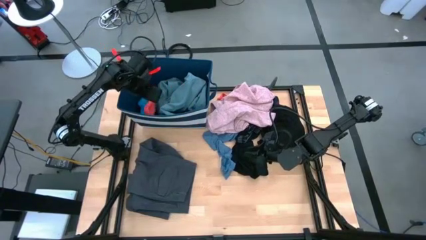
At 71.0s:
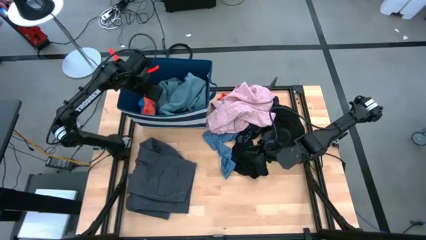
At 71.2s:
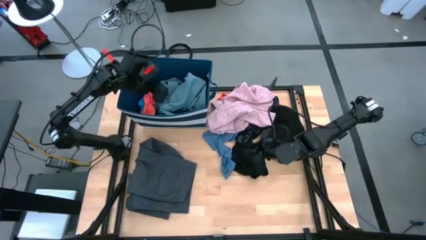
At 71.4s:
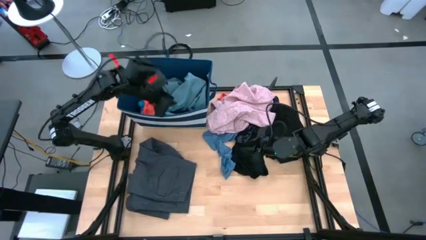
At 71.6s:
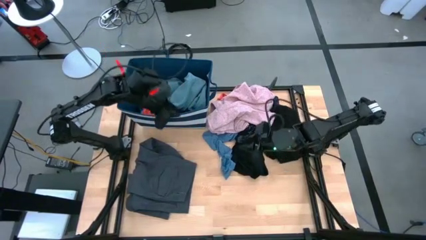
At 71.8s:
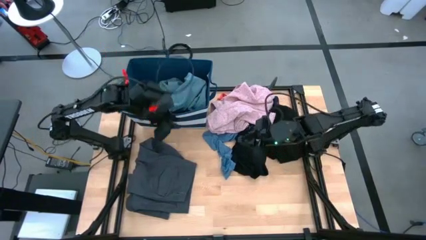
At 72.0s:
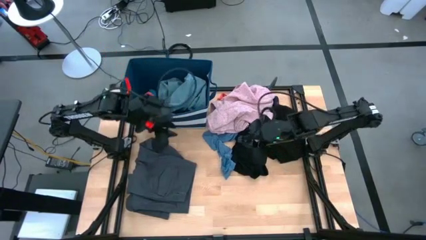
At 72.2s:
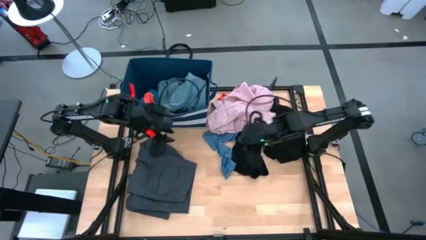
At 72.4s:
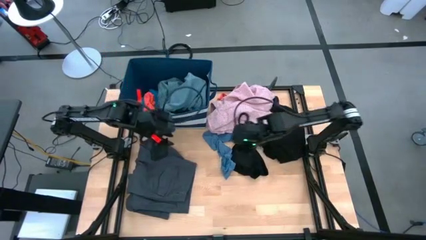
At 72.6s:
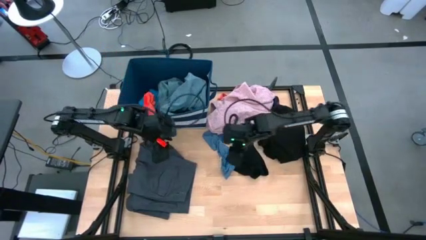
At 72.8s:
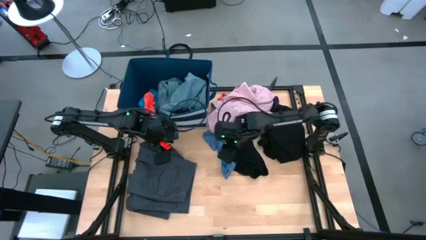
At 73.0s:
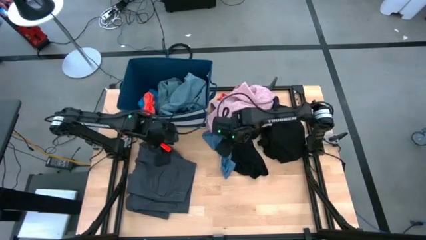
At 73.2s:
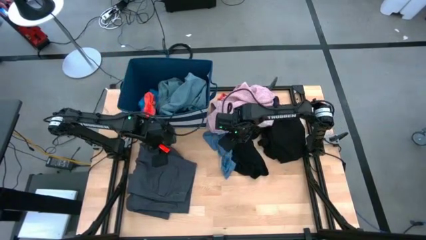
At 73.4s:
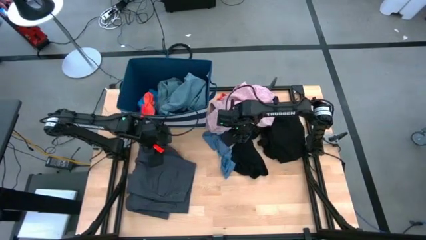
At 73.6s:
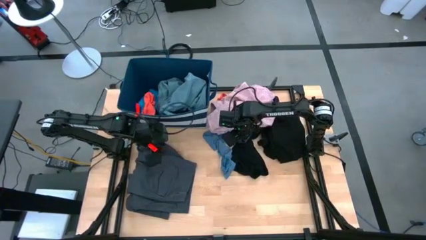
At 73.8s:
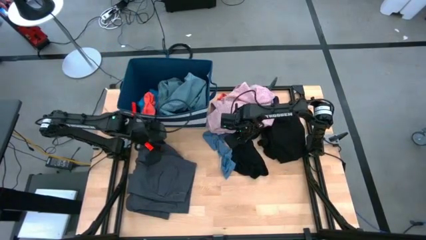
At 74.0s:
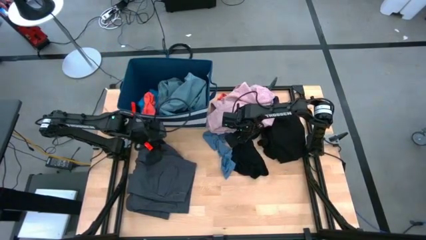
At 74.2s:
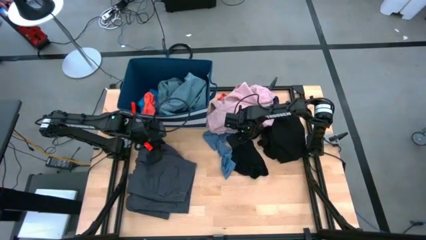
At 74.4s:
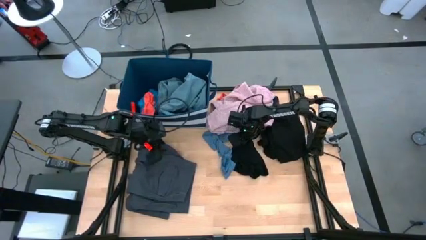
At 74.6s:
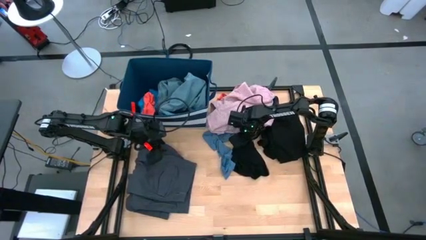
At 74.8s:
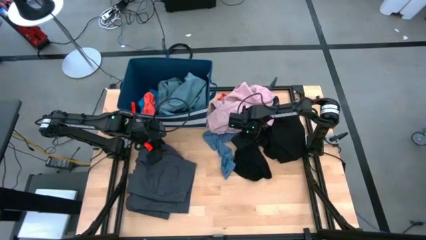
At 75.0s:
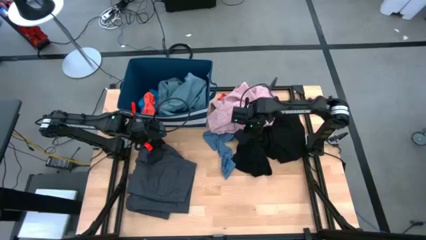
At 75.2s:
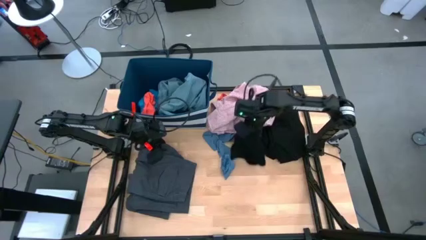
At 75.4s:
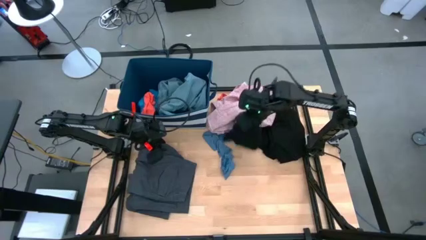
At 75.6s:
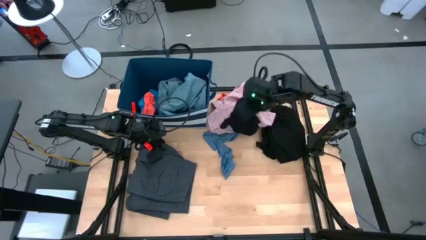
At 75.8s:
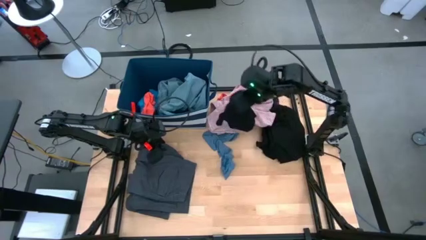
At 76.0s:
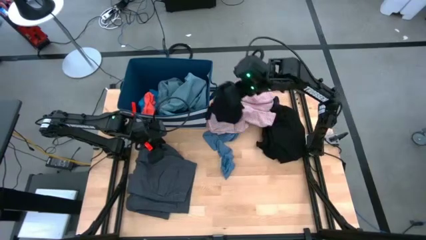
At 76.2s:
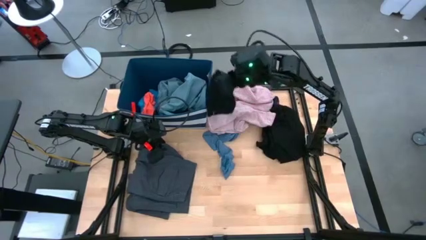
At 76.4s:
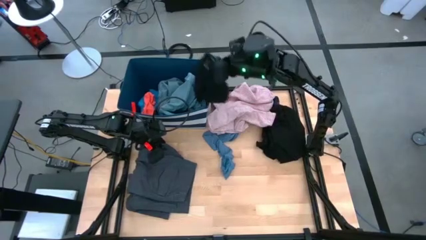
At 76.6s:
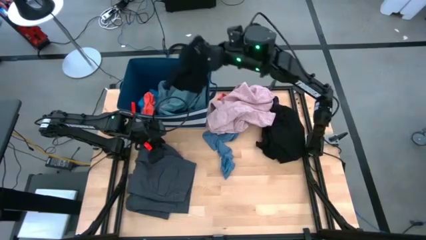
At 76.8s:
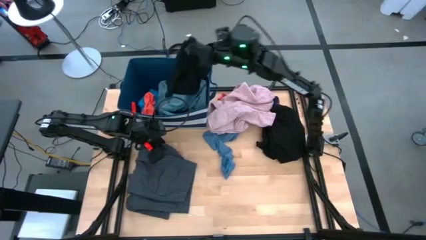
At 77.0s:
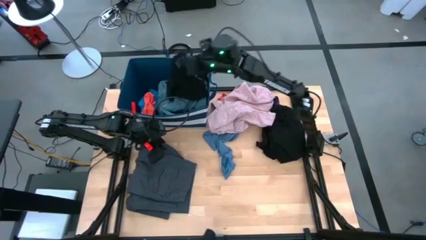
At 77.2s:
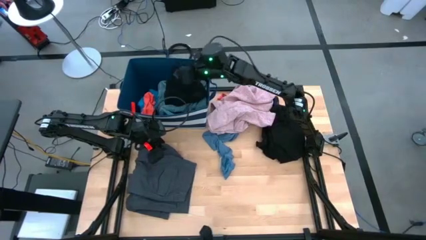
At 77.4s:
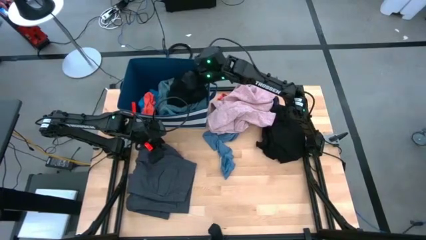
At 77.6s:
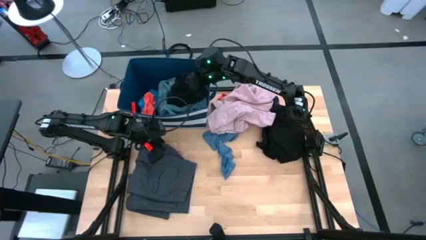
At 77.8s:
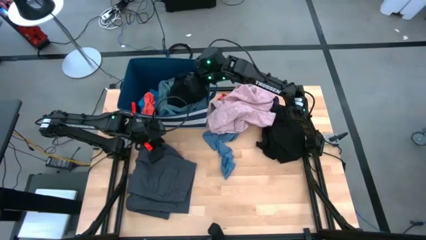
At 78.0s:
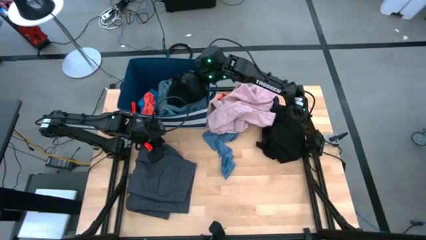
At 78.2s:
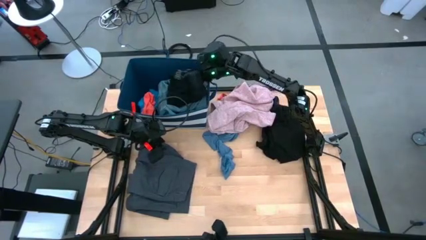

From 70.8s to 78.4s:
Task: Sort clothes
Put the black underwear into the blue laundry bin

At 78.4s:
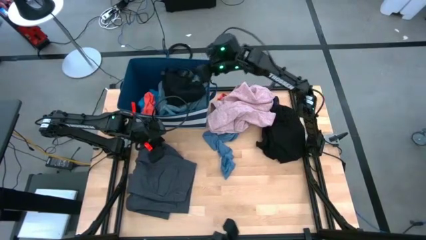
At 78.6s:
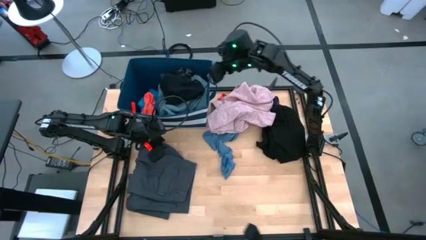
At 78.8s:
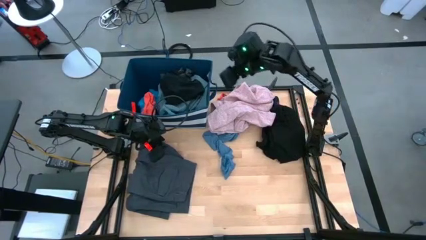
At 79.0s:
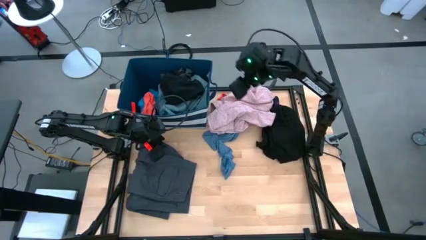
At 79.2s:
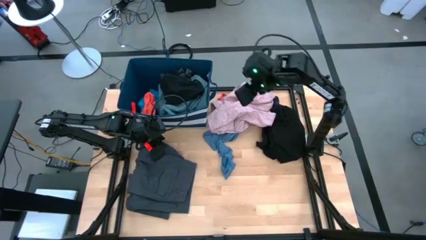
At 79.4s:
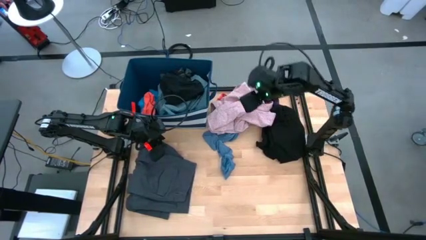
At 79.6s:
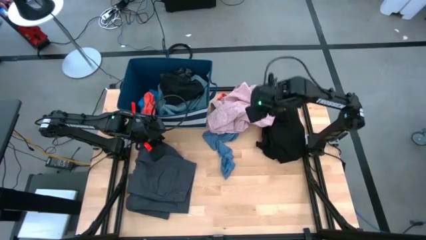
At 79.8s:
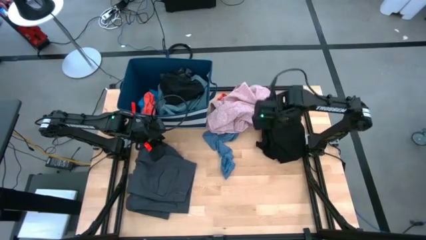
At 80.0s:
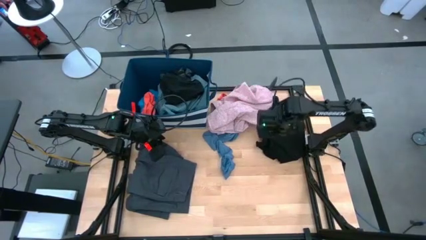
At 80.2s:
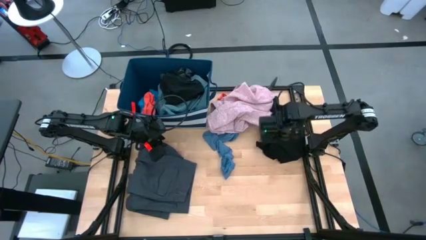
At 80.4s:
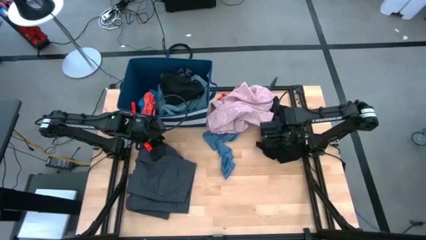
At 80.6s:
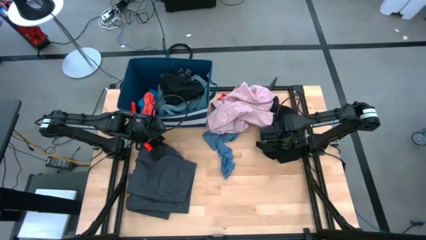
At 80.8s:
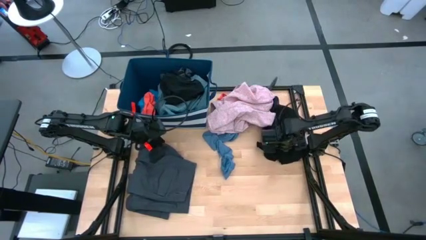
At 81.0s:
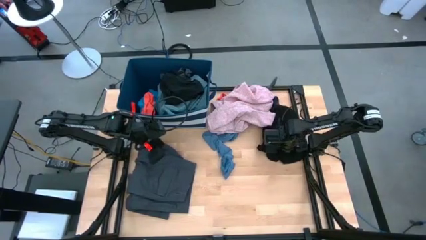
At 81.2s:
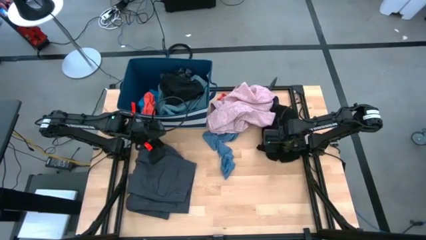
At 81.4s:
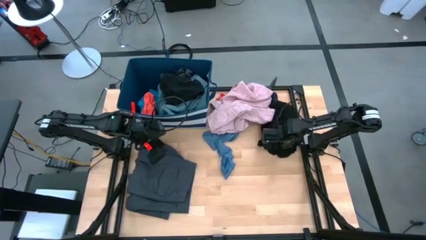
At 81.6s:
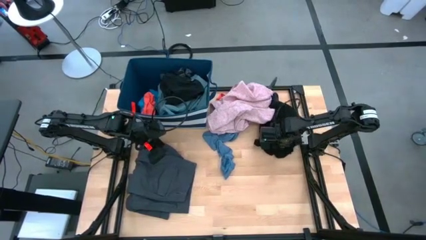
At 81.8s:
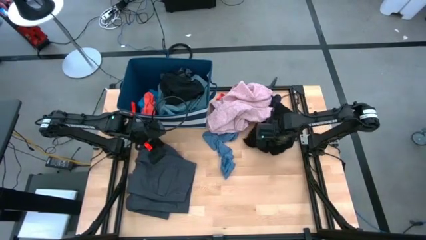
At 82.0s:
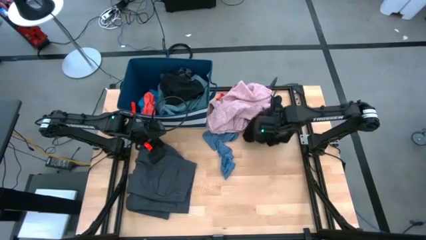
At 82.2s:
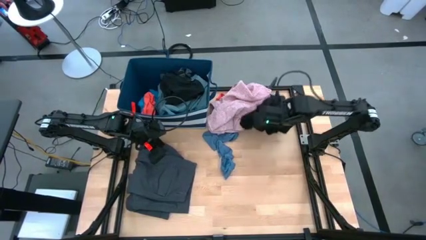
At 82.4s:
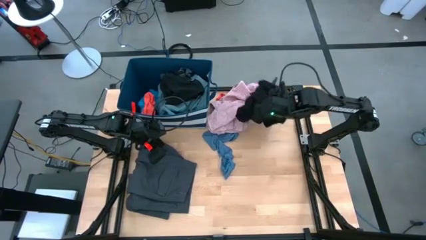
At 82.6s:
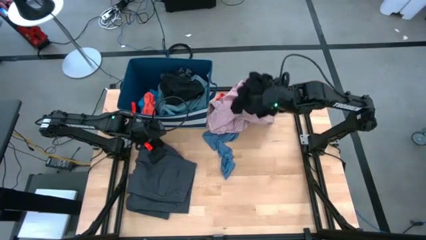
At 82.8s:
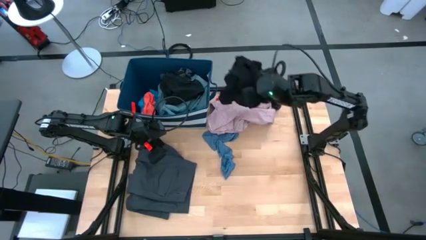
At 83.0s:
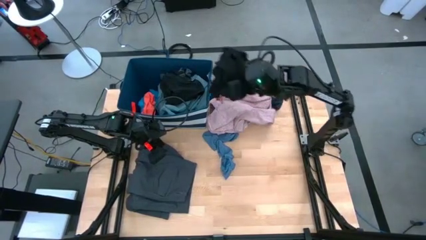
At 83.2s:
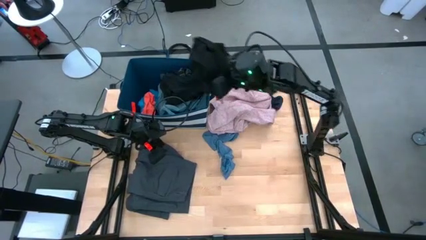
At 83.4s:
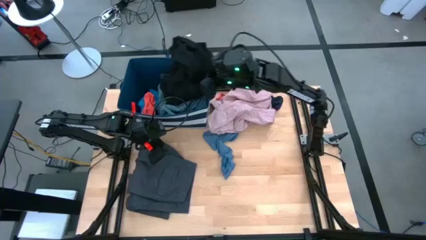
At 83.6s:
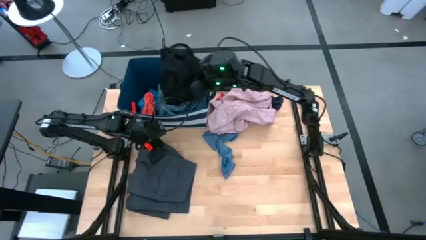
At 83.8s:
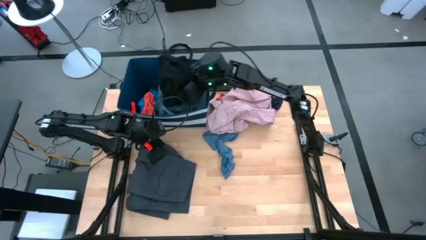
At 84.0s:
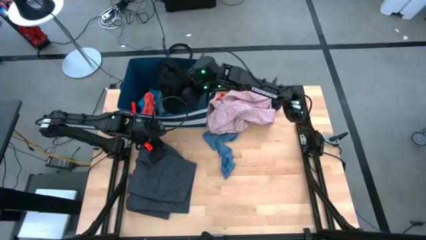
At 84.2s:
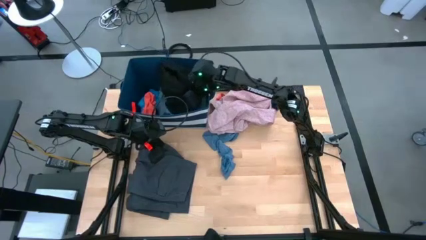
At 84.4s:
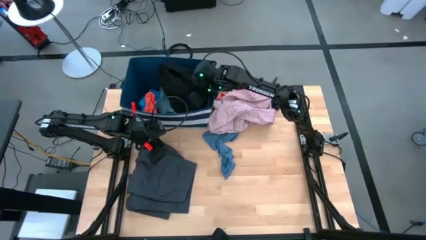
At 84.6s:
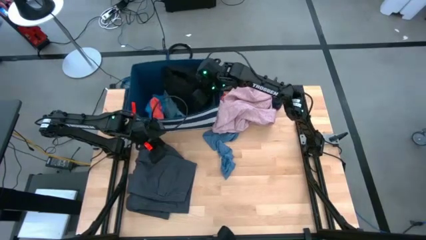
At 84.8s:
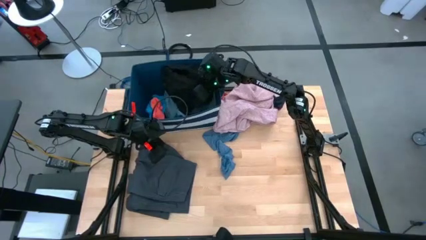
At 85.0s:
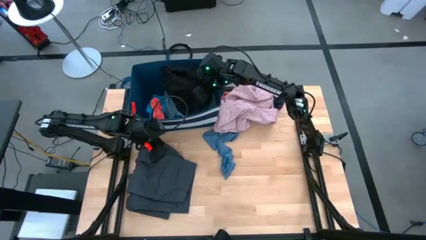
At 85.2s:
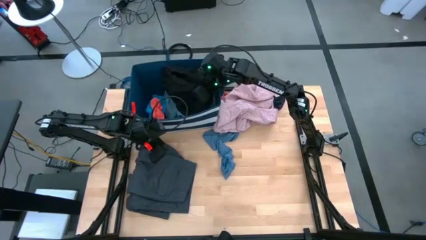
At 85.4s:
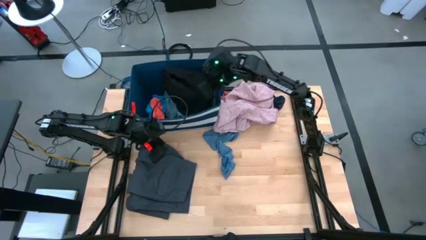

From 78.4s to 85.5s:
Put the black t-shirt into the blue laundry bin
